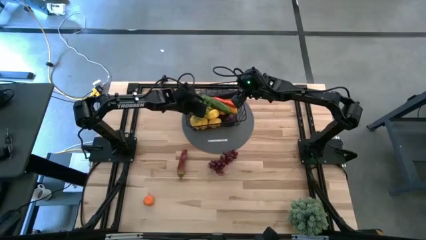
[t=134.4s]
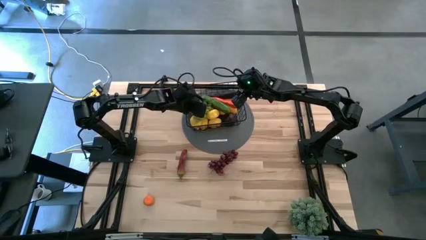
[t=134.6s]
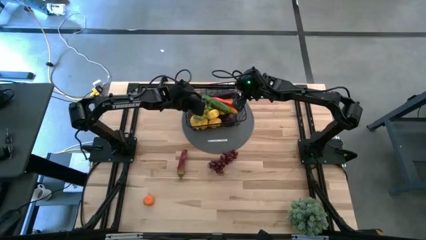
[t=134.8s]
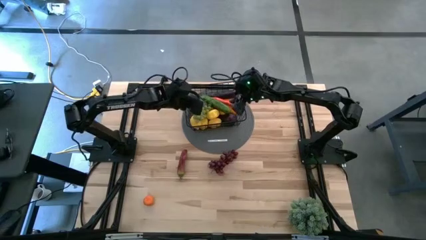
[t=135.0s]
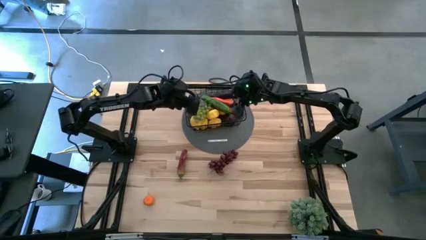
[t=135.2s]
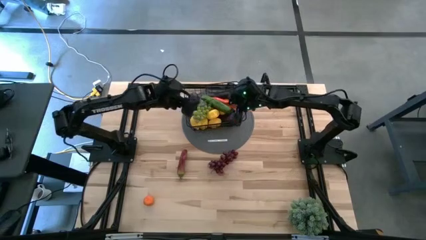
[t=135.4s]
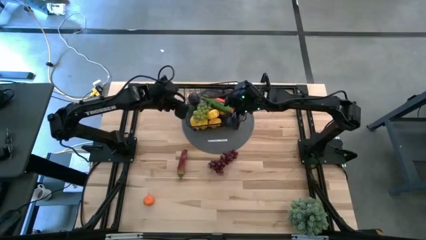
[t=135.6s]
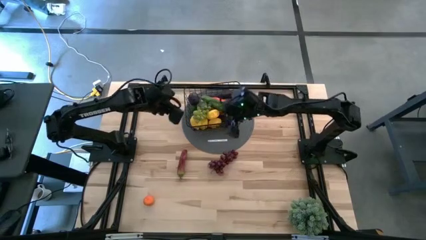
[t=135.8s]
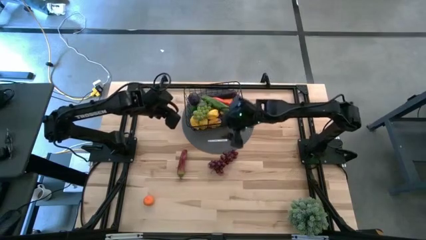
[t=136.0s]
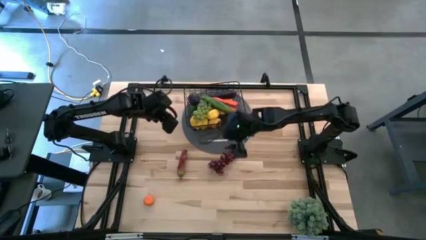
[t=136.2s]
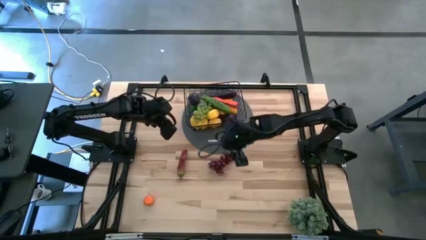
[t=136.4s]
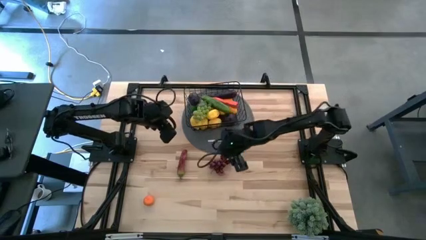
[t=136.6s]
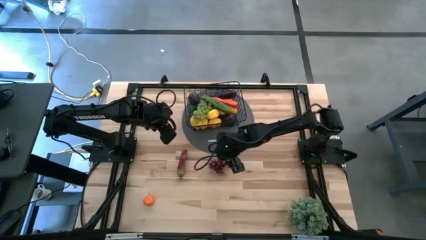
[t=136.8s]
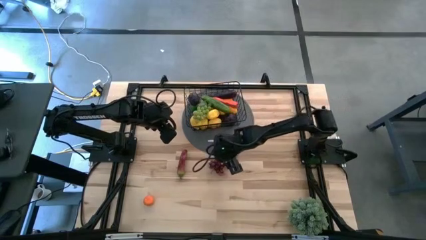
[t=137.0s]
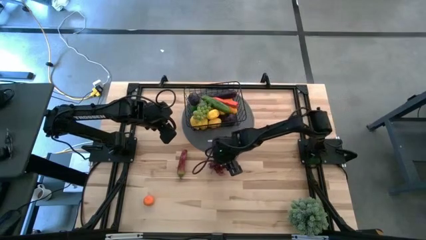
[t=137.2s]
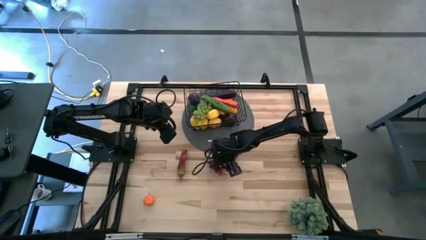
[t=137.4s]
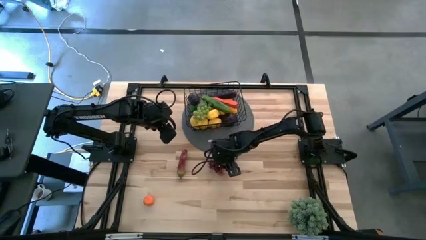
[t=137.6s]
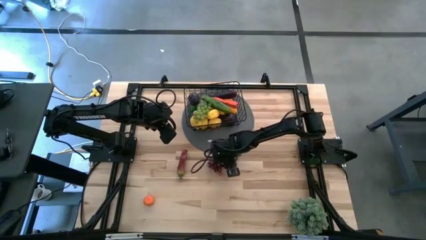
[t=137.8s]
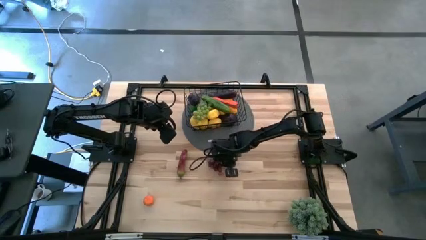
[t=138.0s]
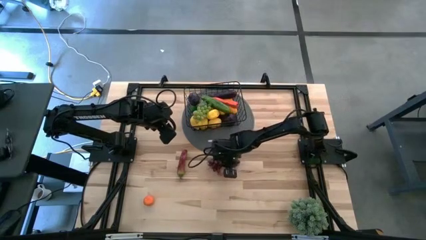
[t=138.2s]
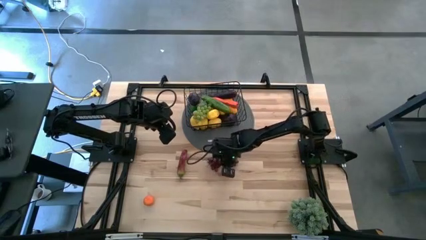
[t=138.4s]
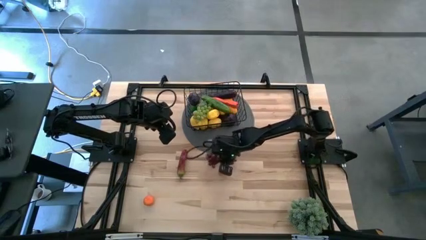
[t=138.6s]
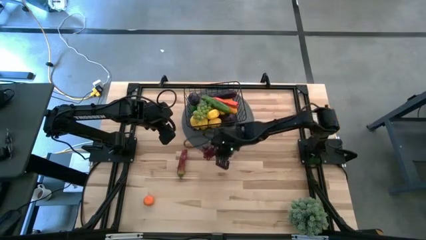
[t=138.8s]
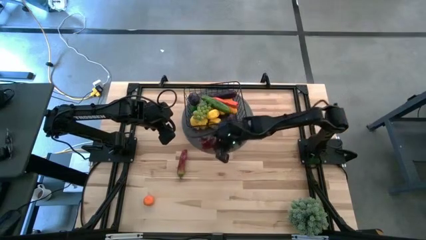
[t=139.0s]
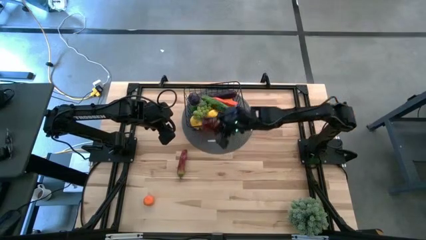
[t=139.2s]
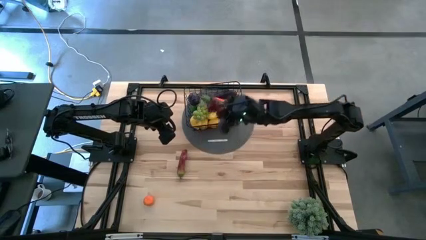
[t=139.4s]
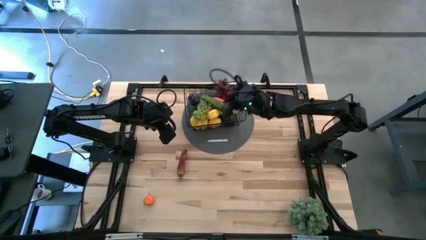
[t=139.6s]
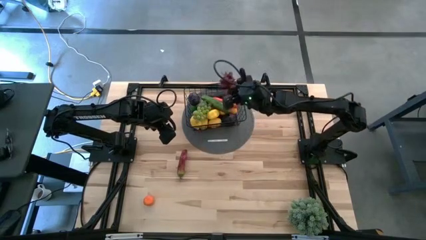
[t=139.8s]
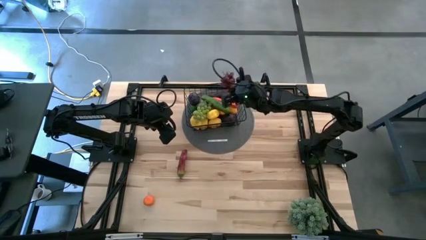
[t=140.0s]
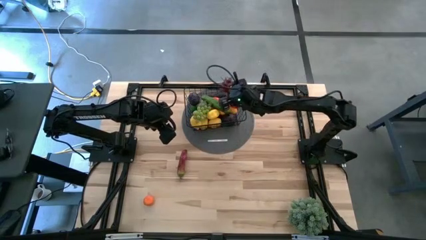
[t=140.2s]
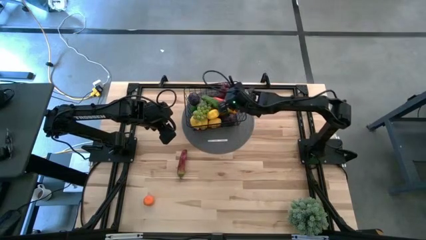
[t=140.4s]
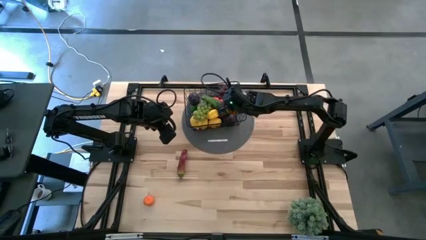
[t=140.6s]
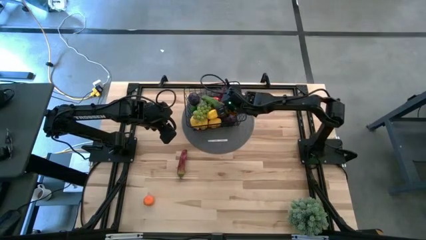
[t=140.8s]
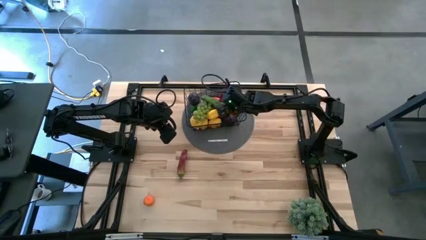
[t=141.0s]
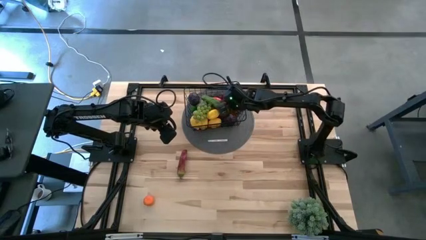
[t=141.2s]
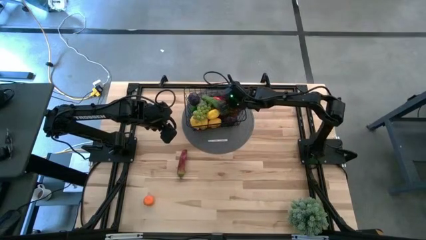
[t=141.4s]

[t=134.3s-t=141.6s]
Task: Build produce basket
Put the red grapes into the wire basket

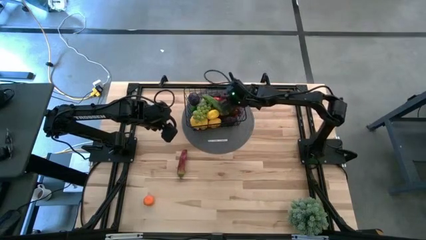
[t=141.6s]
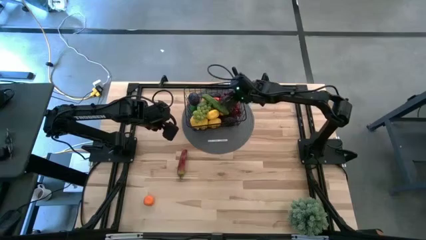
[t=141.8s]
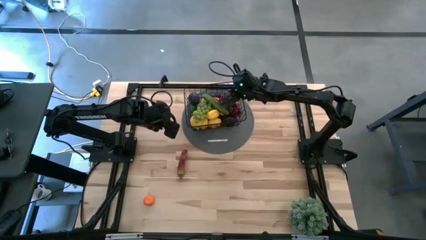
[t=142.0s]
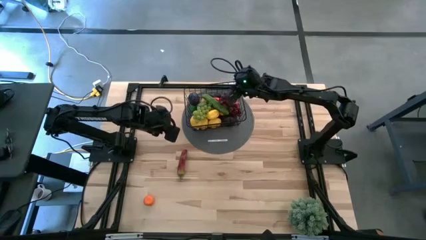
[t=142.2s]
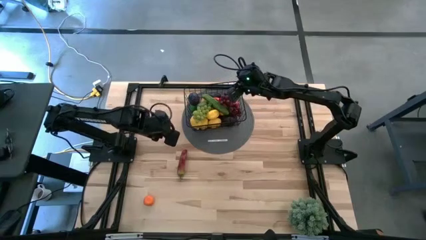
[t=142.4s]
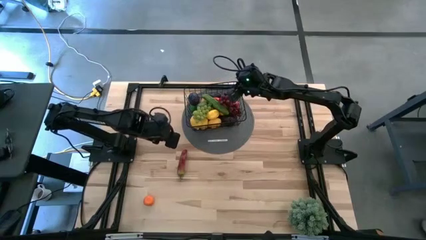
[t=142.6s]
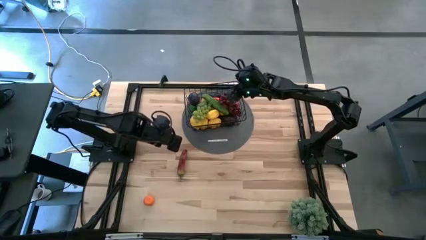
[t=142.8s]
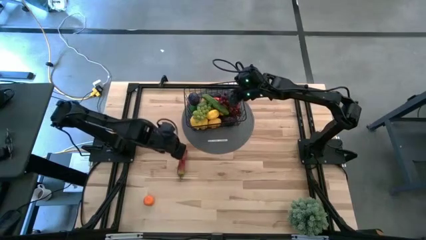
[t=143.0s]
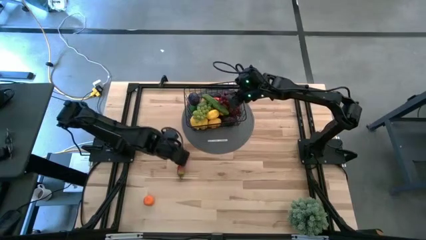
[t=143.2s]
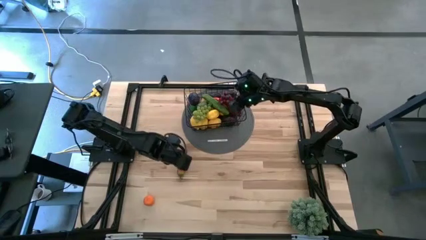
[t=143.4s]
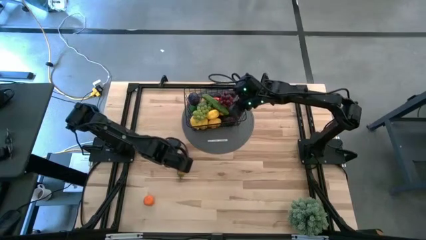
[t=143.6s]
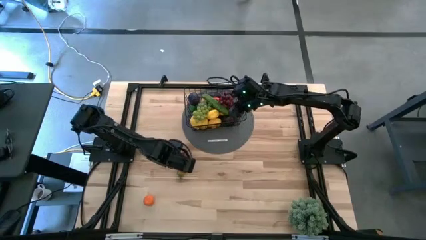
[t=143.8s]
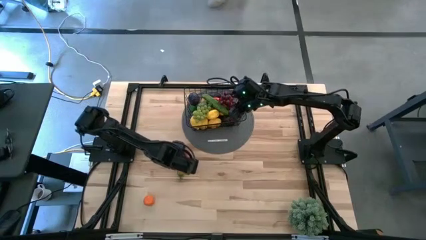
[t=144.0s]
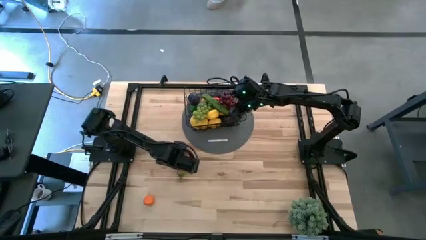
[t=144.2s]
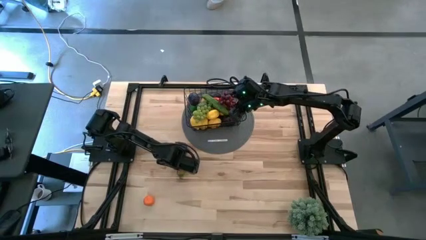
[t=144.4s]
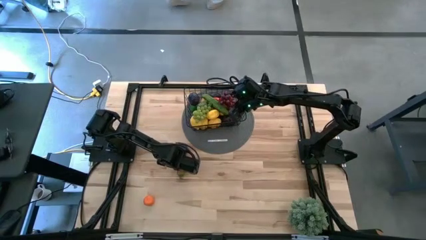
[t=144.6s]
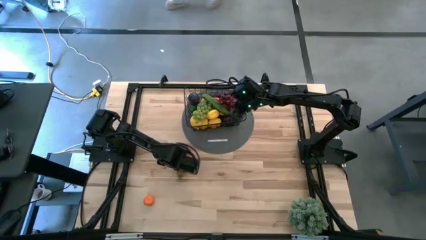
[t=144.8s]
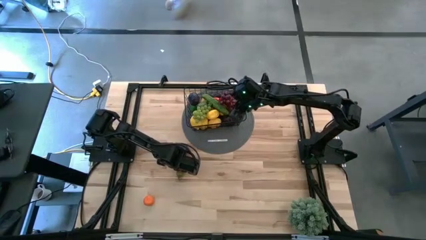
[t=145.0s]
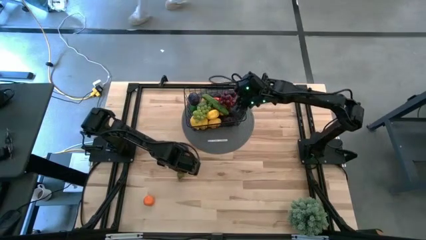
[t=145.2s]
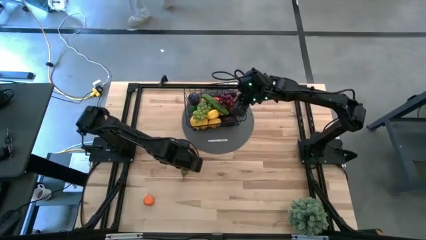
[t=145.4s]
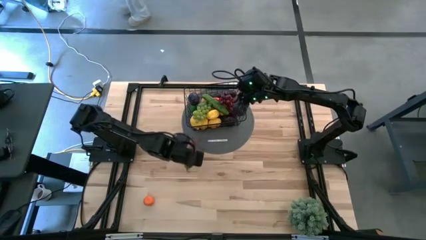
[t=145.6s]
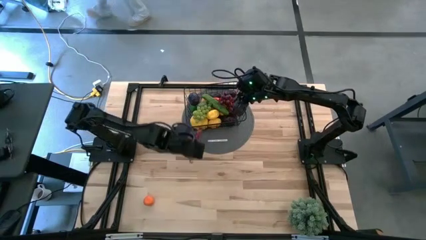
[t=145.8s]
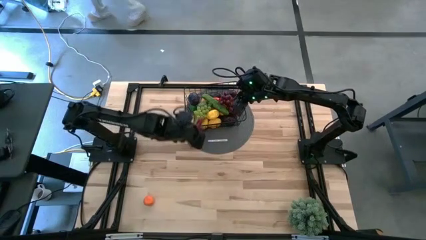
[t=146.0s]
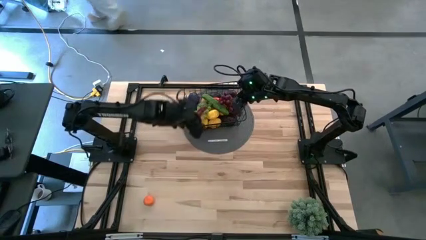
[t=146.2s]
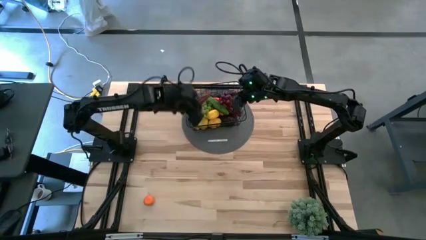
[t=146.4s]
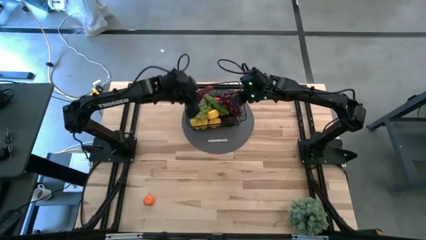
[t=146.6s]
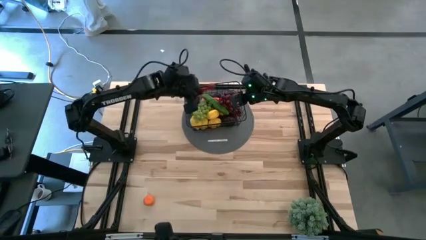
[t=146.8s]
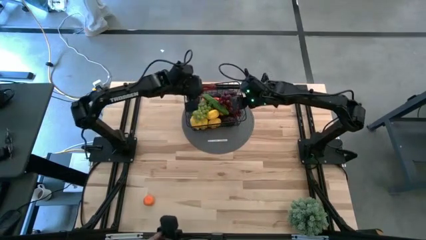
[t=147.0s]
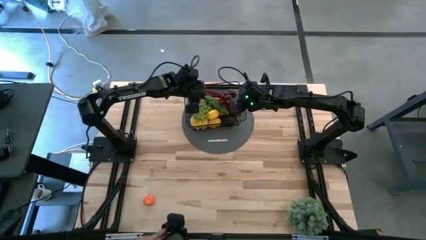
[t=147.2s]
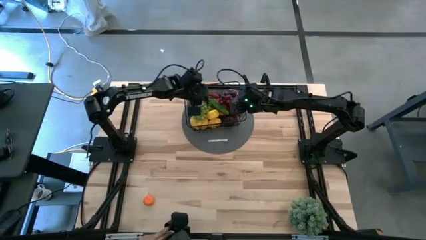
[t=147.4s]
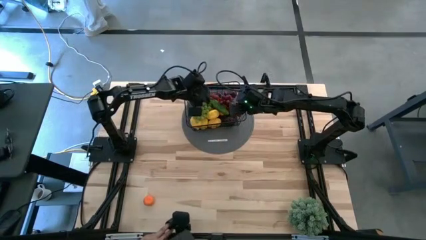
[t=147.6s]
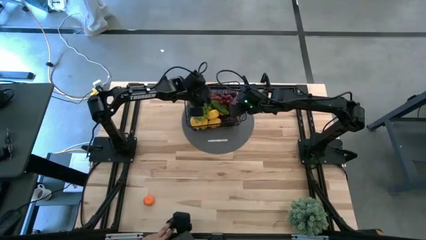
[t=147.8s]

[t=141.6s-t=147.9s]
Put the red chili pepper into the wire basket
